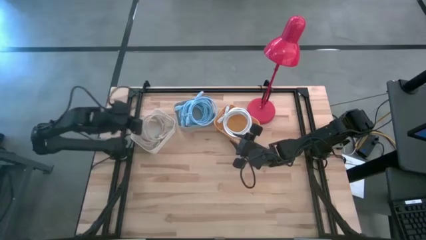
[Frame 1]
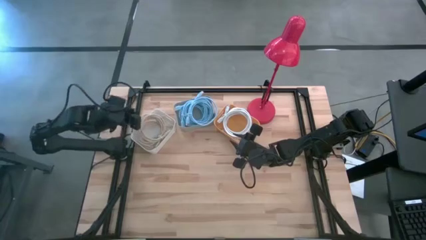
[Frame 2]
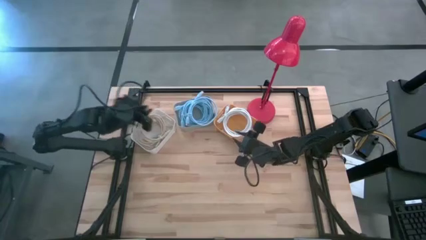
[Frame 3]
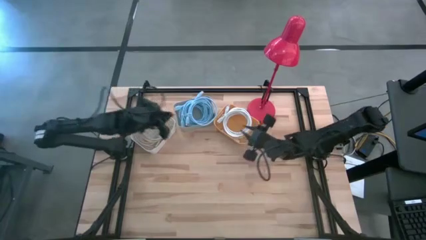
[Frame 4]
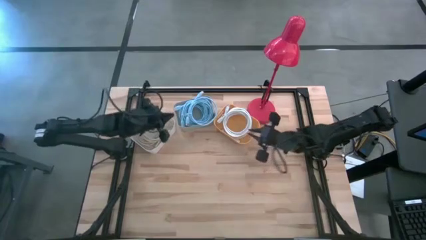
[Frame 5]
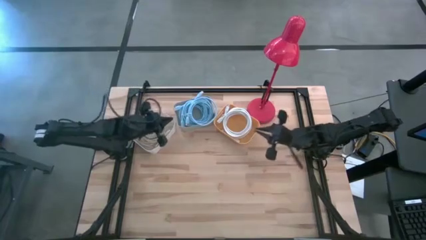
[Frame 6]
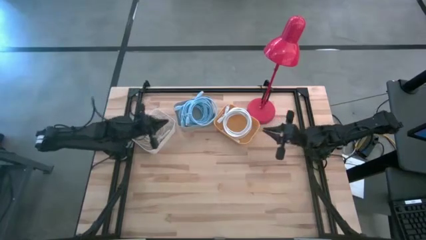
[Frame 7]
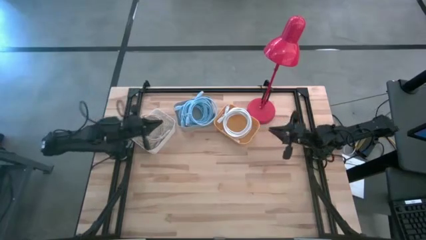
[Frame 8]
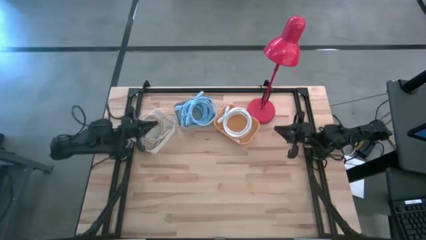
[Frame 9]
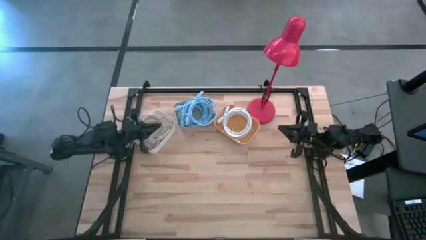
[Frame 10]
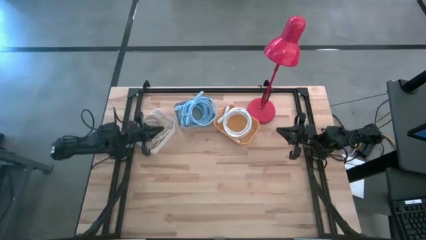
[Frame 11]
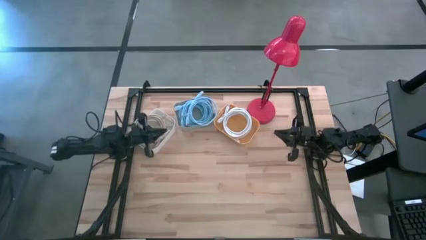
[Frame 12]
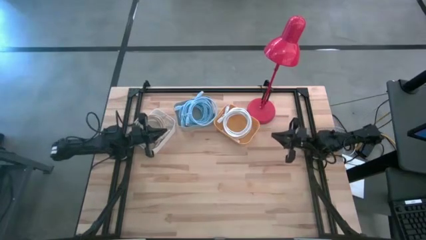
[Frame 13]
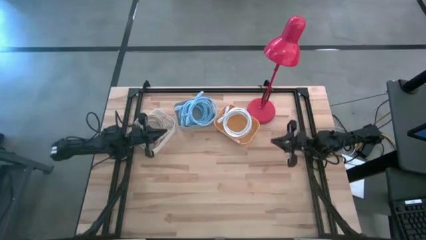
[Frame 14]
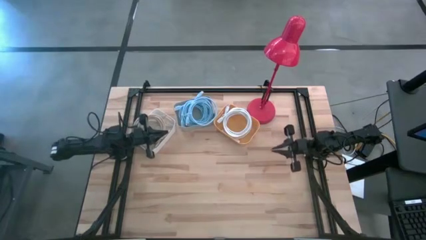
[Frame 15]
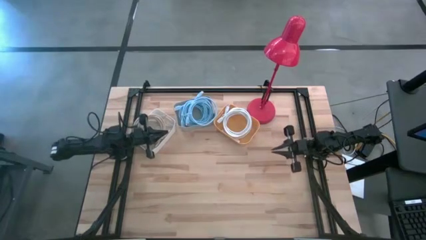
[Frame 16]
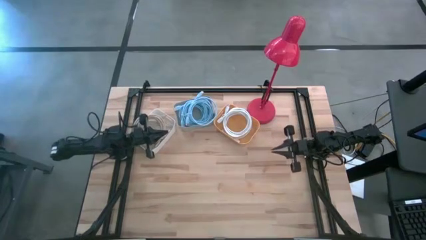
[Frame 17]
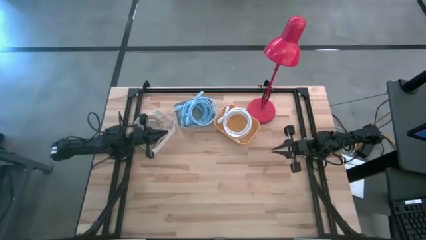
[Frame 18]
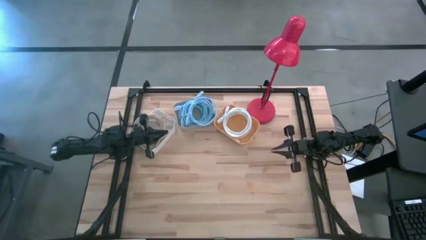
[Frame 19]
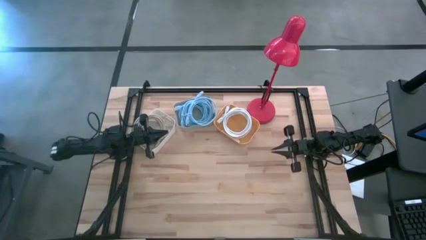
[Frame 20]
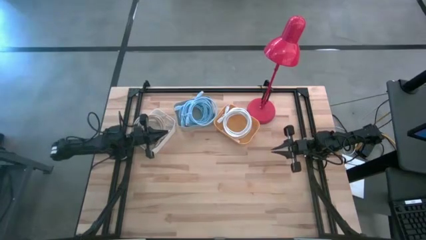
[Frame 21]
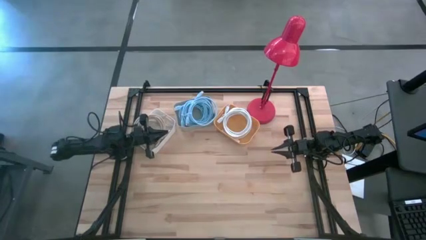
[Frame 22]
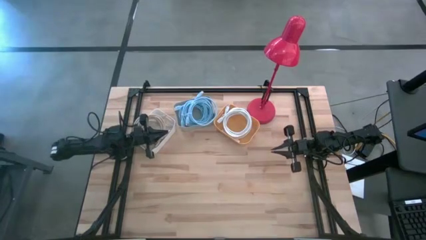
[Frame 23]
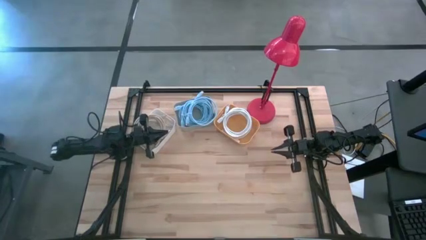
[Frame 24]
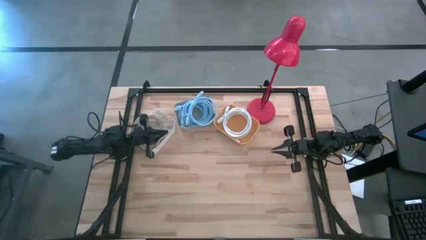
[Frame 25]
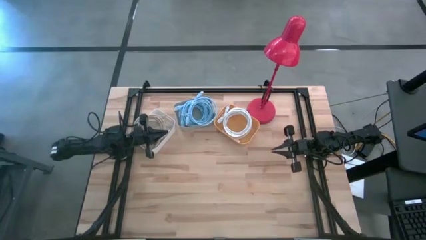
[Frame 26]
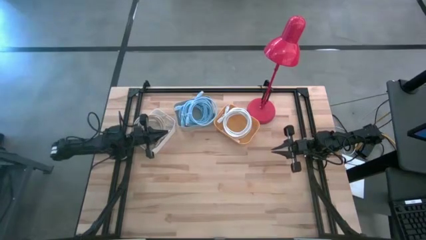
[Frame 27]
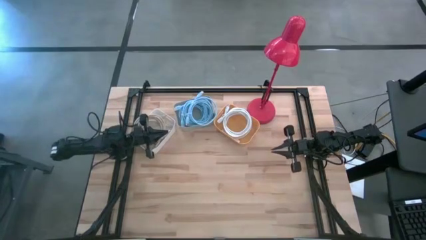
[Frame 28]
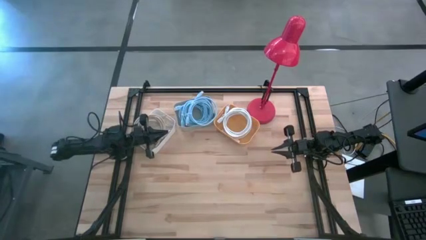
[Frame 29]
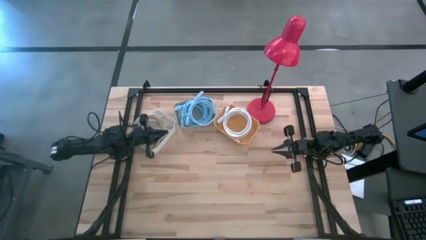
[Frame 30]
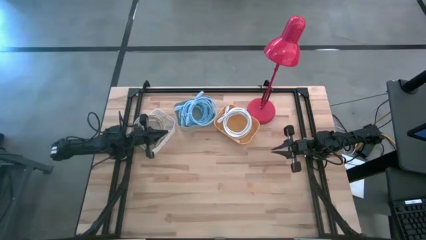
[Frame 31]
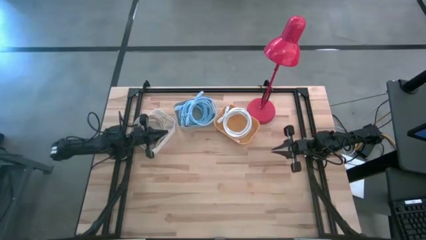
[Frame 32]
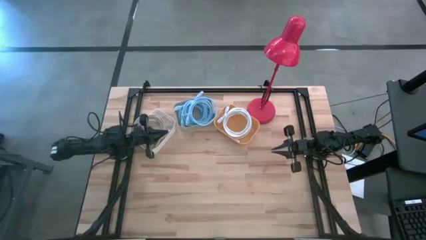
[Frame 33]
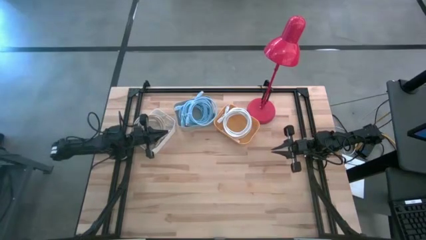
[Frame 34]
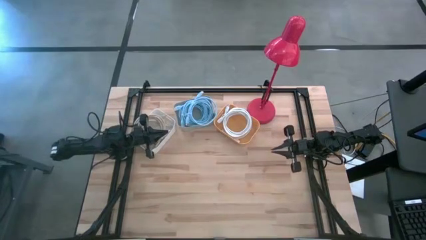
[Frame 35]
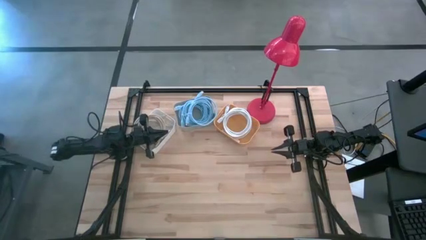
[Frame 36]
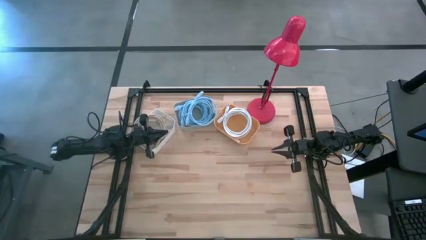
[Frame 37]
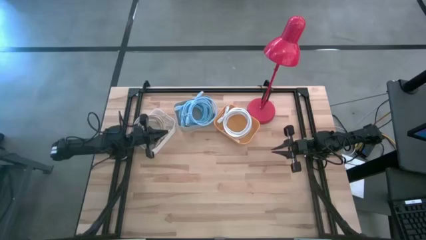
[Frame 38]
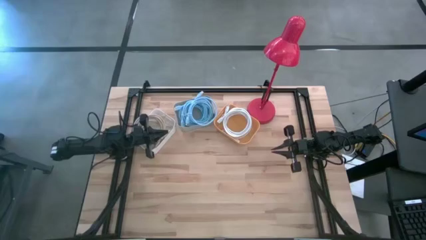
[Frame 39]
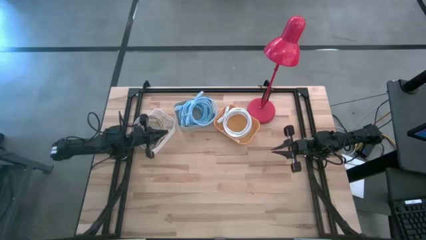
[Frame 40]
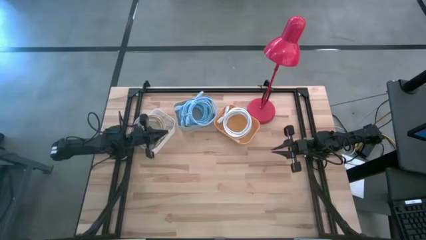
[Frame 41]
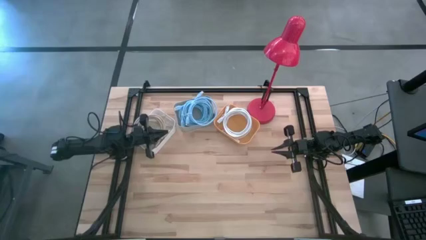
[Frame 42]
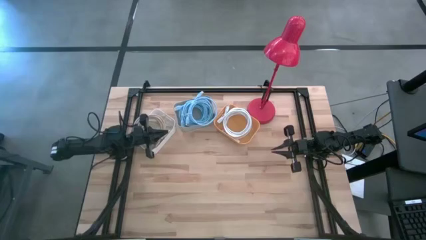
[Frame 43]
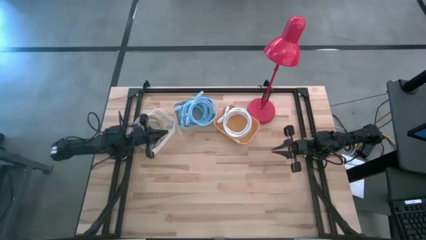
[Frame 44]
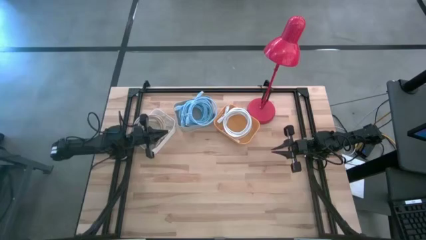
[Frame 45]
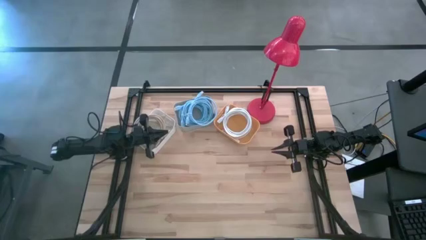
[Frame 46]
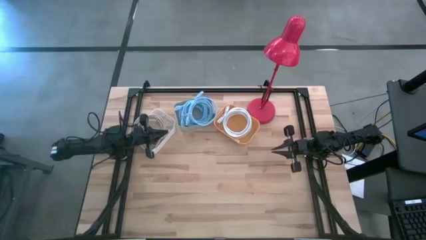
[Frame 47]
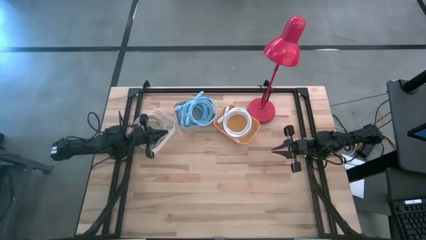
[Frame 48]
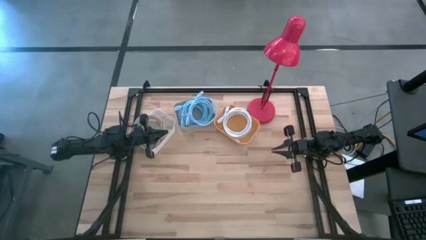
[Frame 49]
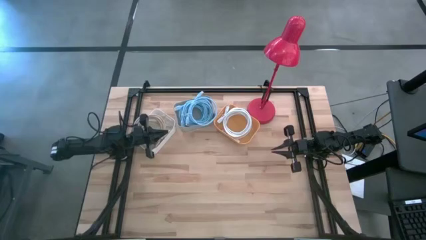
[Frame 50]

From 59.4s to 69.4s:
Task: Sort HDMI cables
Return to Home Position

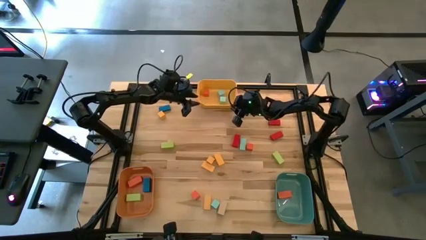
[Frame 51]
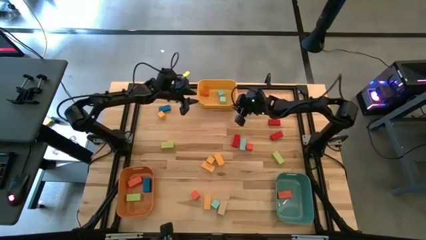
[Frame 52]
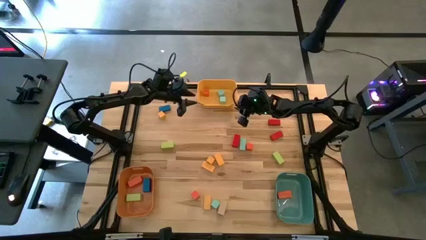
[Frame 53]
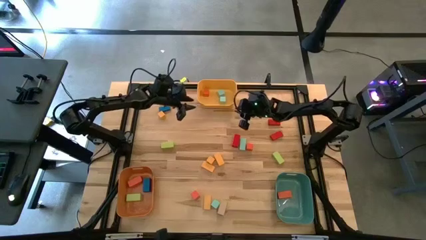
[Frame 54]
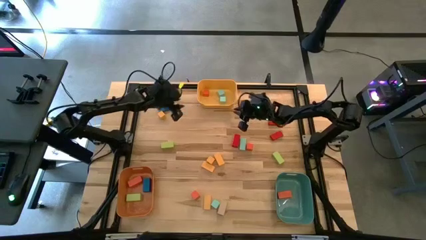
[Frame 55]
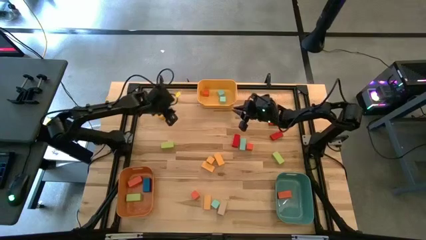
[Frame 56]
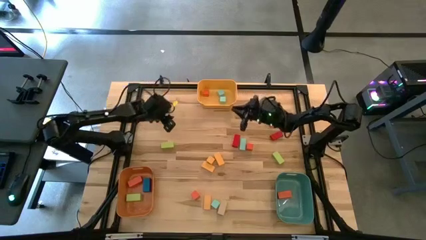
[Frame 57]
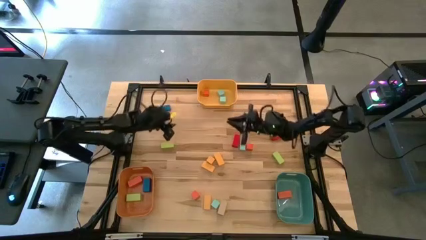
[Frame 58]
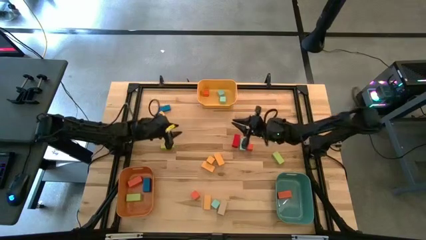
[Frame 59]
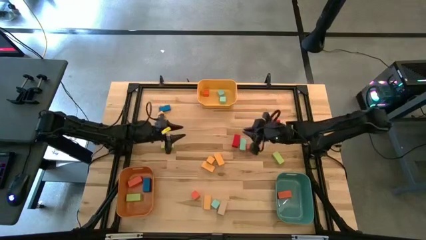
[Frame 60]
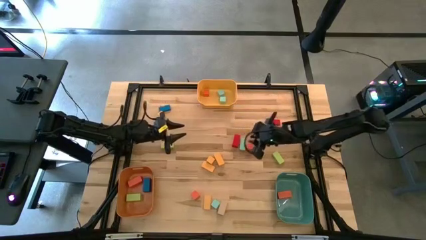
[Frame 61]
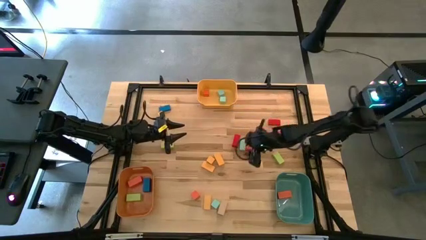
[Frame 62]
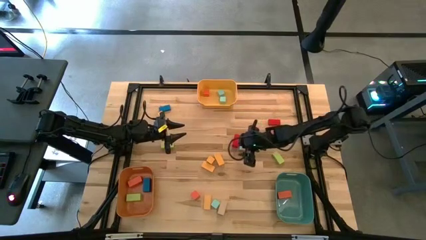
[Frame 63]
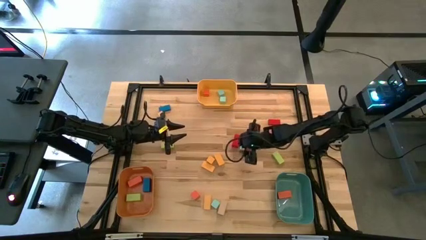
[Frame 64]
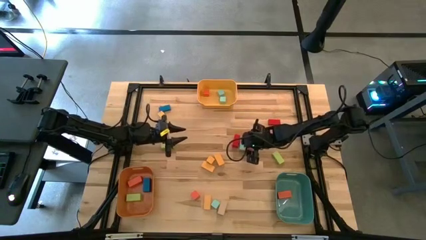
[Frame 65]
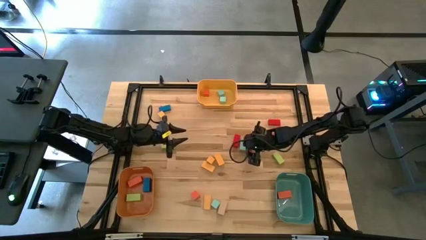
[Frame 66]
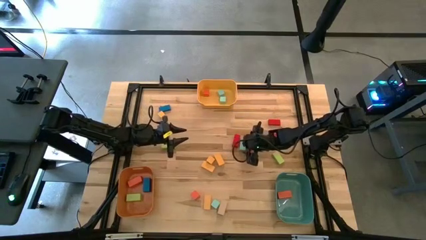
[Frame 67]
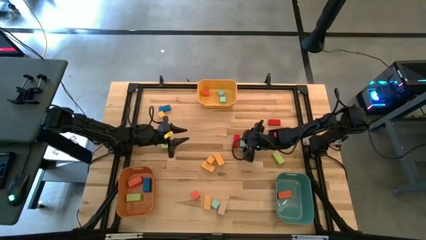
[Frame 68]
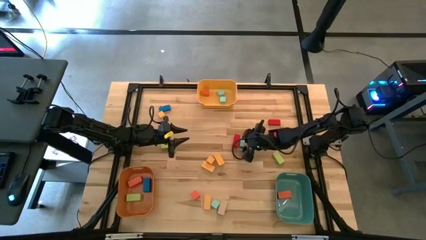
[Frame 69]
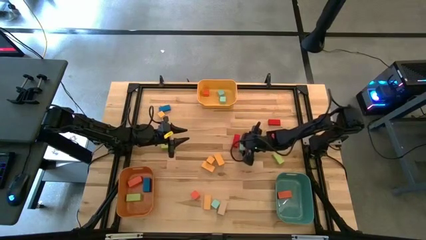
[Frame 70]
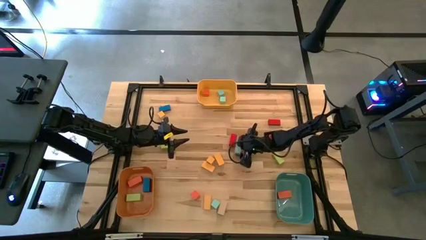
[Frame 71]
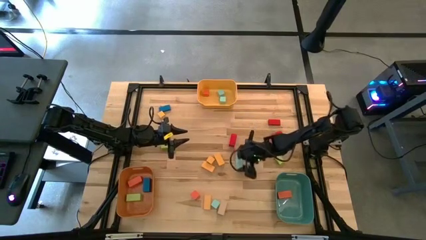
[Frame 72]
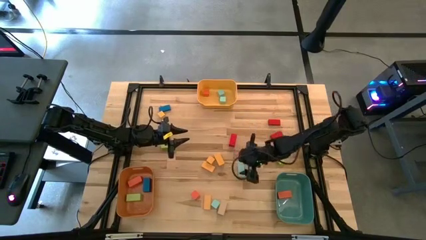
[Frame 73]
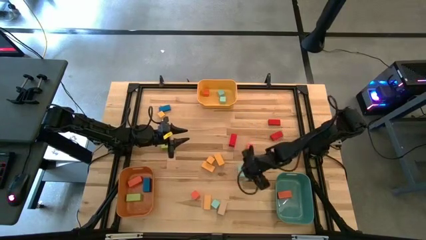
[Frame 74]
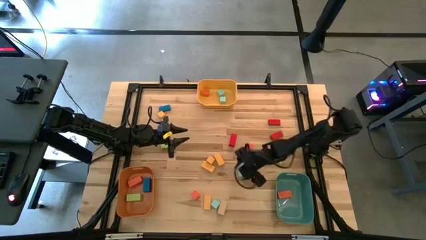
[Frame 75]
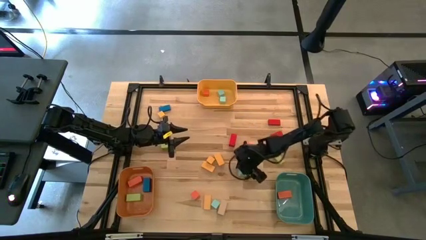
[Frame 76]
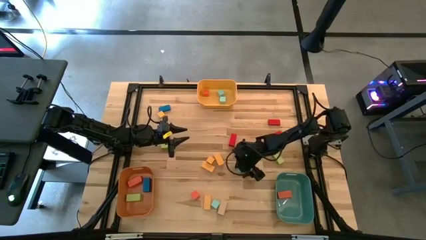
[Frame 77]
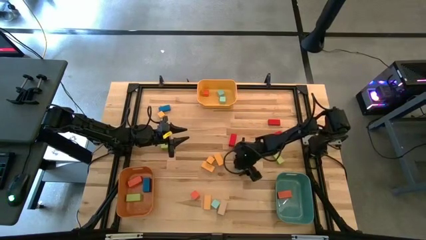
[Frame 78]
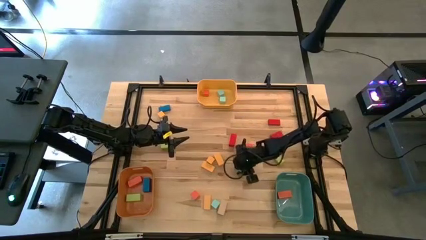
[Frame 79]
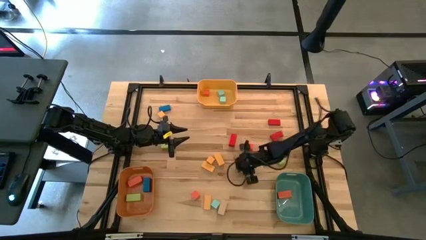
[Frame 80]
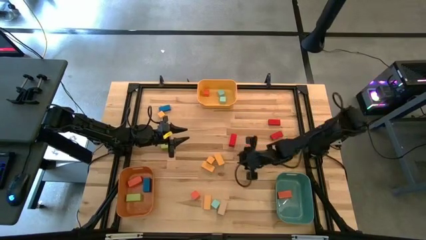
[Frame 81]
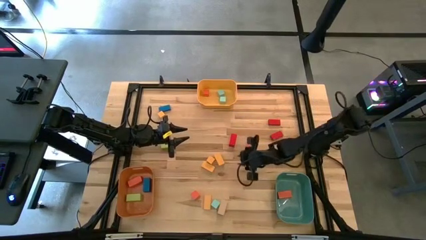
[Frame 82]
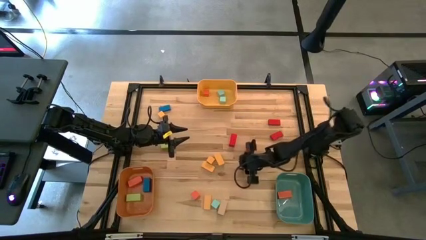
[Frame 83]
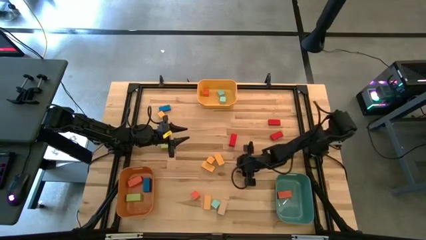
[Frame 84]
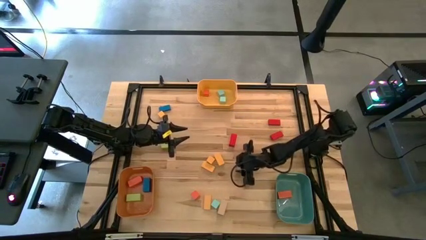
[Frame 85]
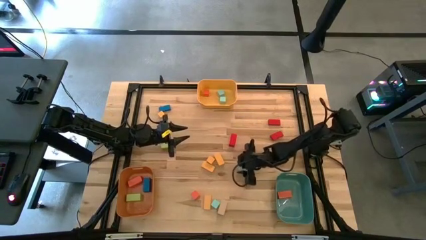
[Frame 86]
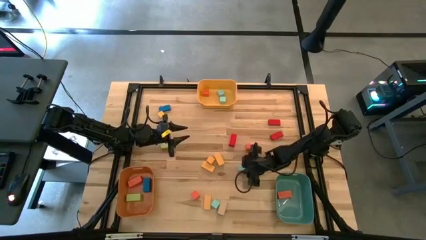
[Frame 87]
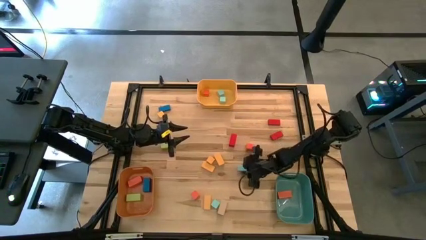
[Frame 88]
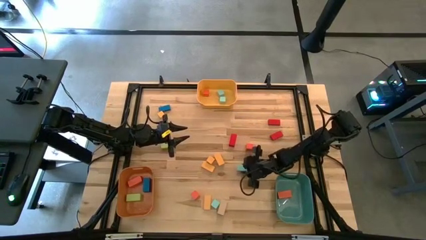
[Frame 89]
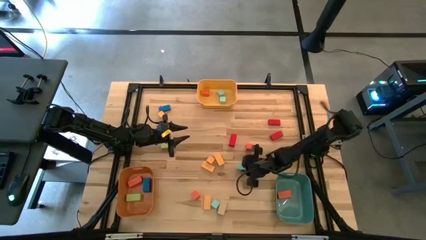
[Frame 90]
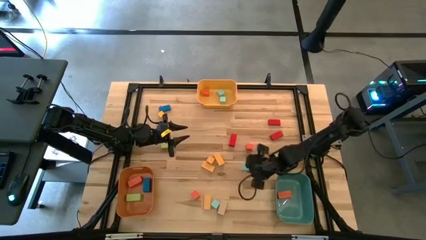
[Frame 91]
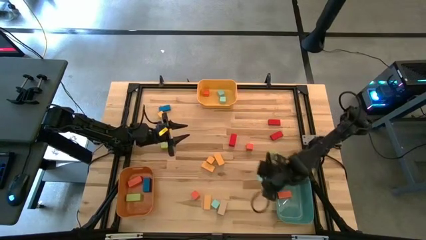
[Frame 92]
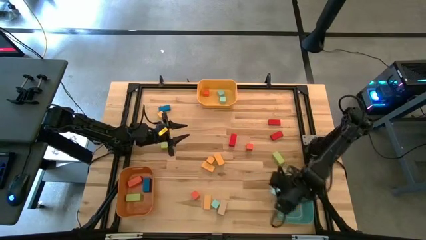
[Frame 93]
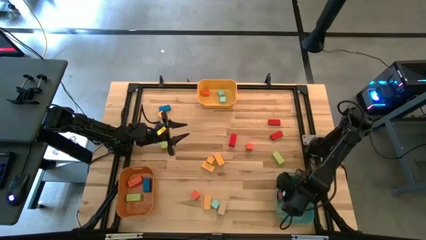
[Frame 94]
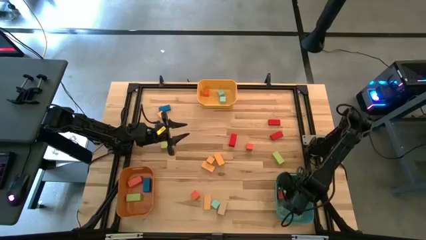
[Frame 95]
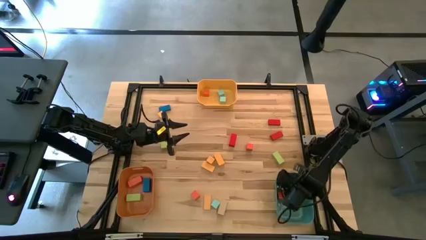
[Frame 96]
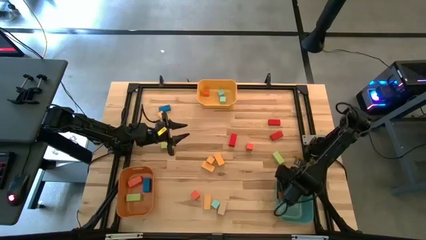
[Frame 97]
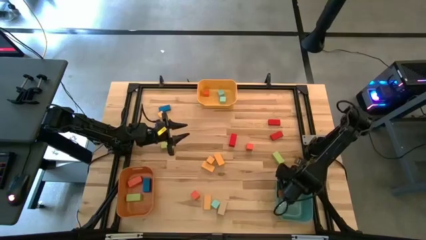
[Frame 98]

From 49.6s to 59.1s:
Task: Sort blocks by size
Put the thin light blue block into the green bin
